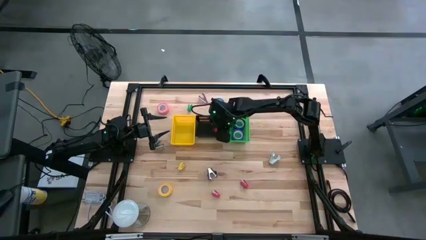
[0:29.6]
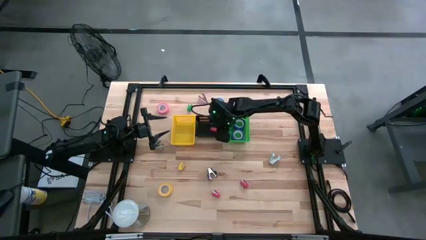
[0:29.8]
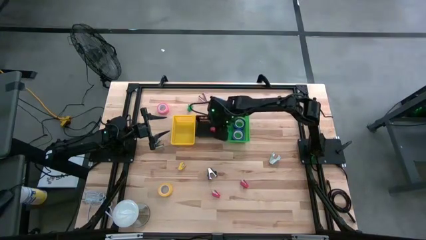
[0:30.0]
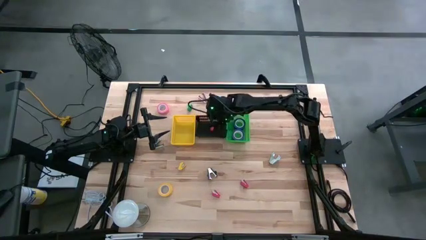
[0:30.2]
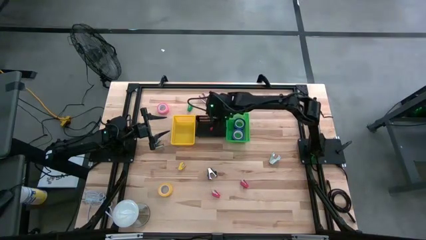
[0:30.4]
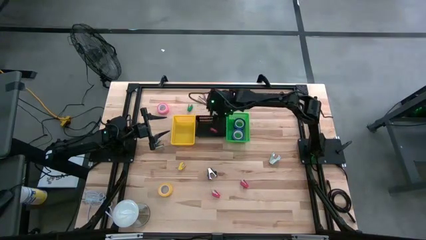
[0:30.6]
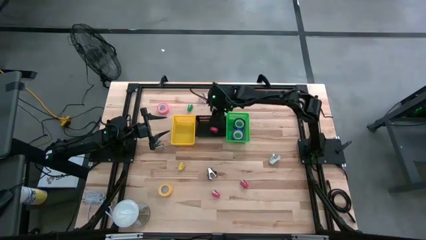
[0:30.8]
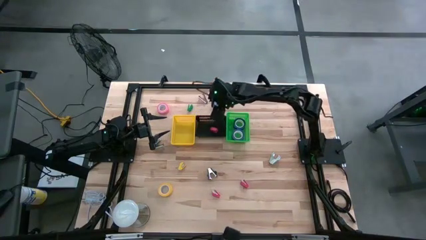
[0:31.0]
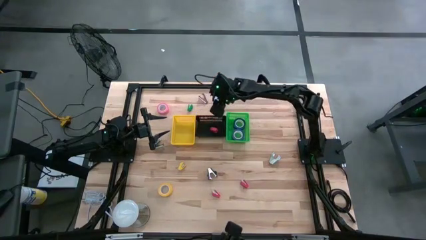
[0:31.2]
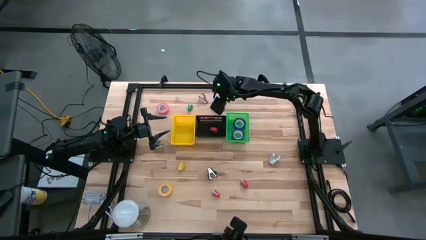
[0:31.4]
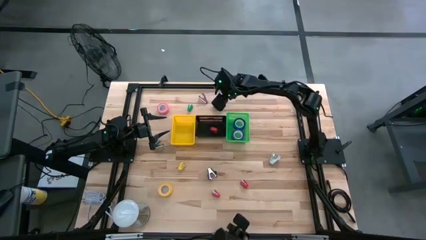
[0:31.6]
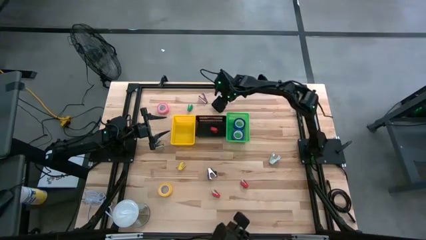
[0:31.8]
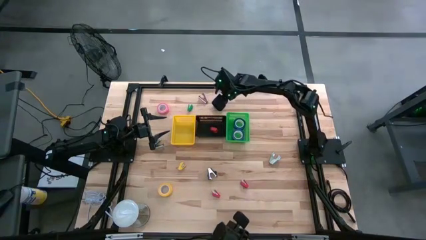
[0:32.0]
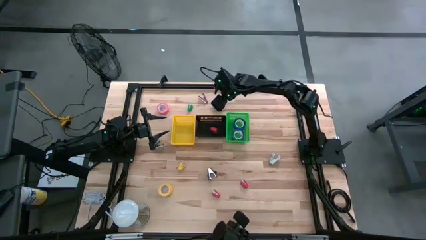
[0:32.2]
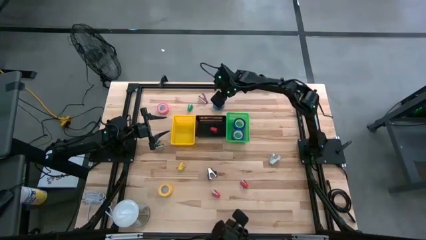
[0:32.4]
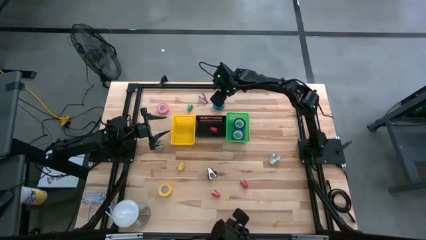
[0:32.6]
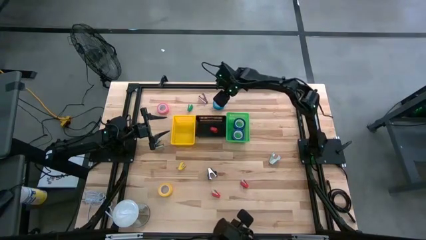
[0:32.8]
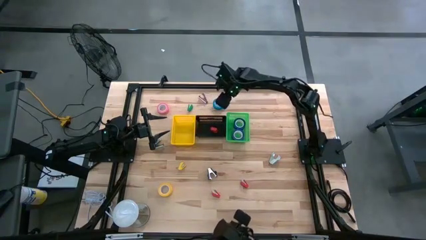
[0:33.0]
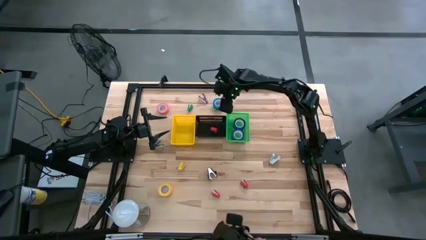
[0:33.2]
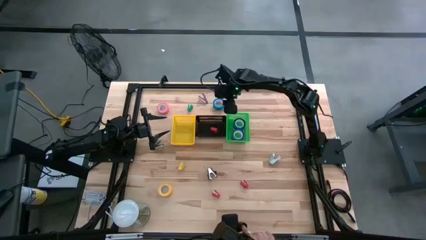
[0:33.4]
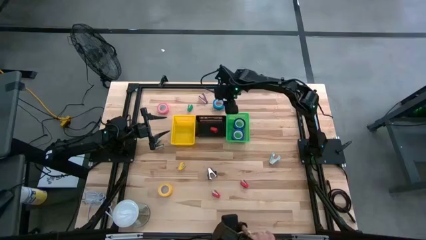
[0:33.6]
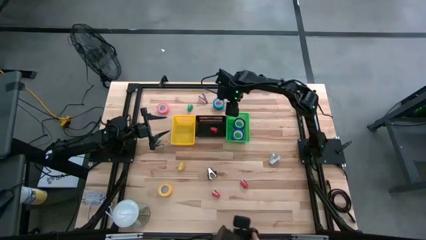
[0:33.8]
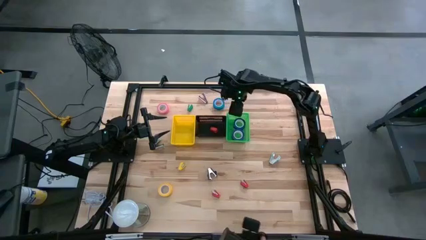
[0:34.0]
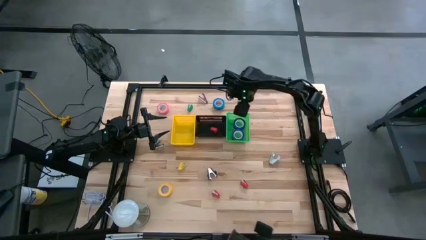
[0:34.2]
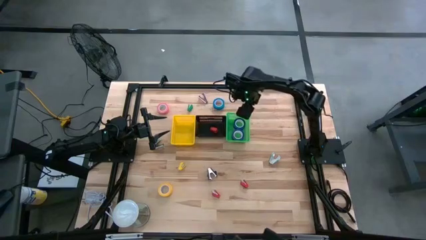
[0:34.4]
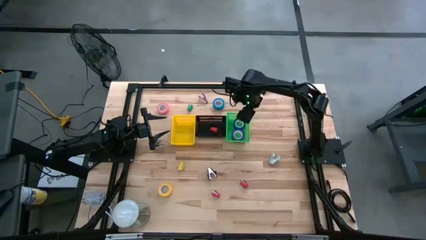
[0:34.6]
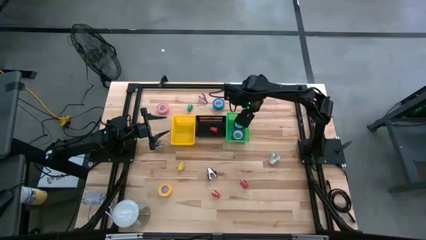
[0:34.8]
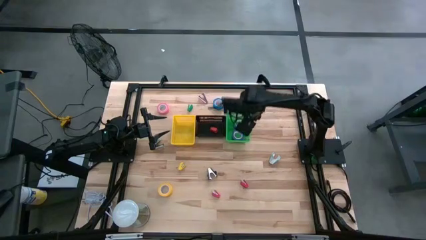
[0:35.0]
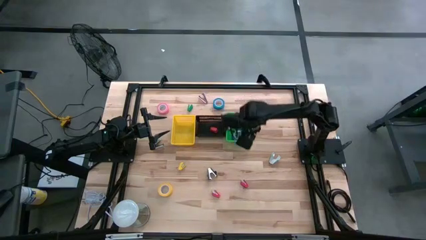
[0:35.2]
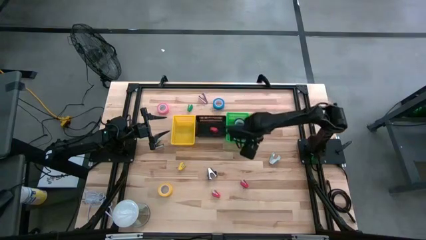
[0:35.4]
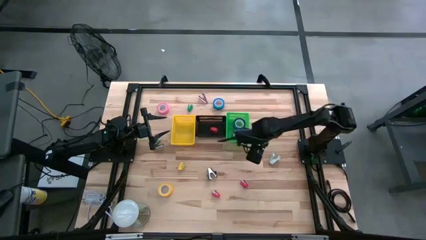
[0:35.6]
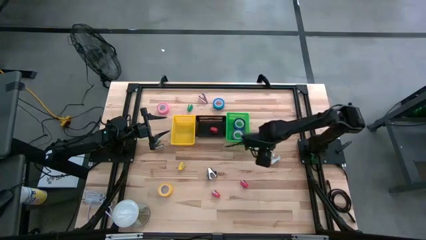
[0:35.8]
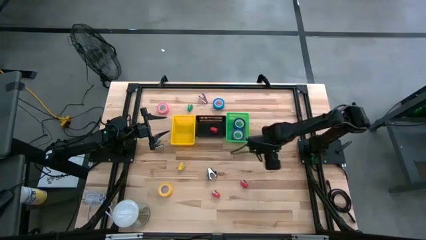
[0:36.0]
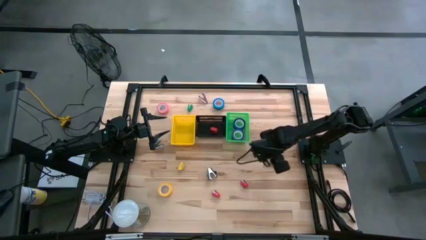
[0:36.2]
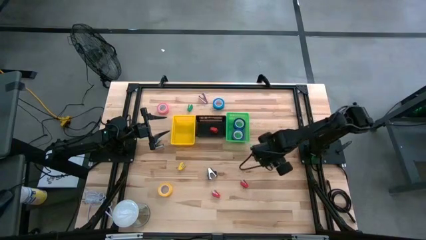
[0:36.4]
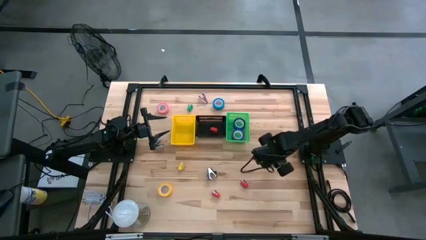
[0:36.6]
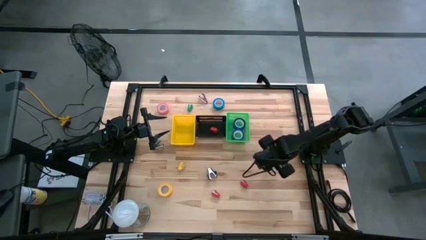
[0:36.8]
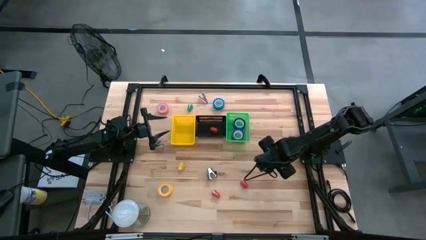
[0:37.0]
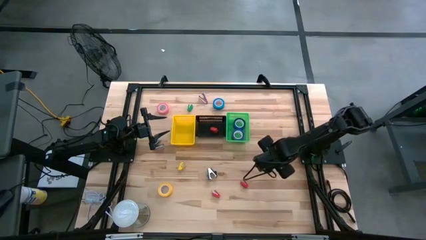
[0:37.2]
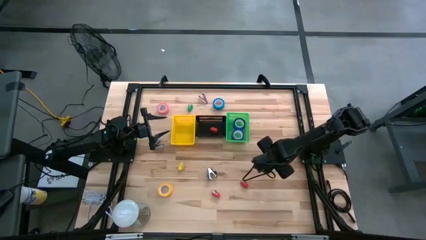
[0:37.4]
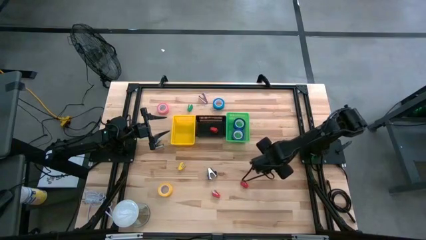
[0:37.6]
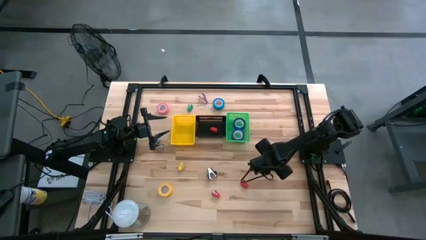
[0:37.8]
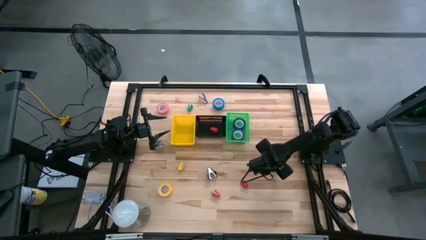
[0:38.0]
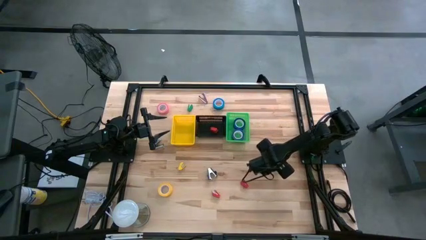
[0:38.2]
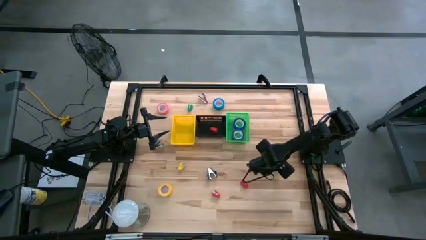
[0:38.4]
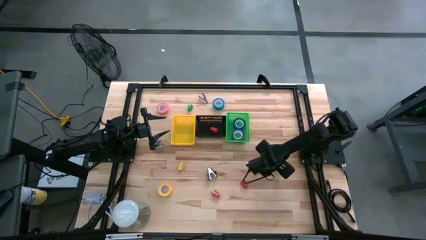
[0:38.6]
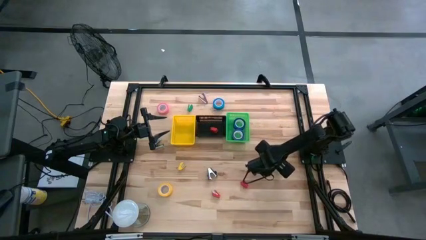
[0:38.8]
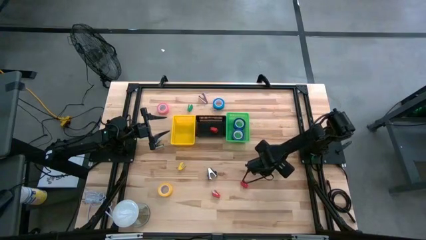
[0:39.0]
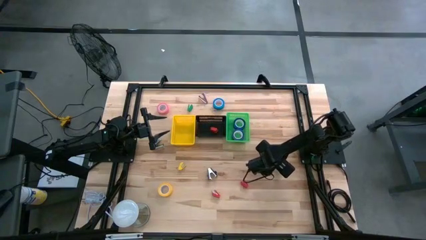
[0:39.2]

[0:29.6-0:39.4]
Task: Pick and place Stapler, Stapler remover, tape
Put the blue staple remover into the yellow bin

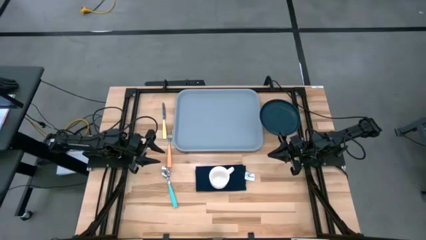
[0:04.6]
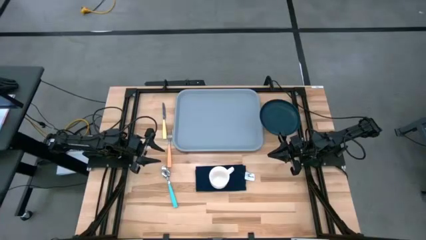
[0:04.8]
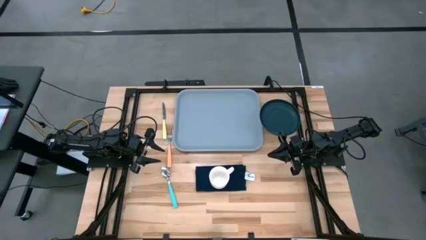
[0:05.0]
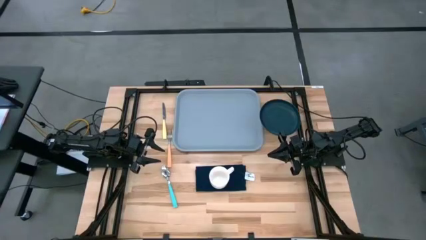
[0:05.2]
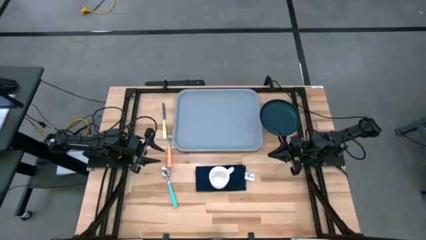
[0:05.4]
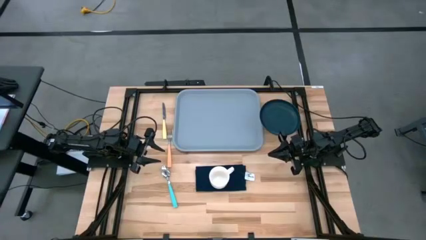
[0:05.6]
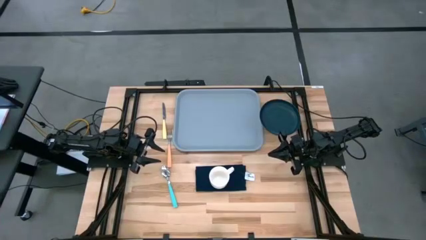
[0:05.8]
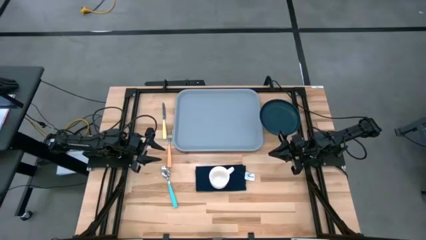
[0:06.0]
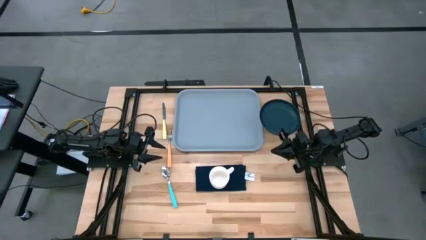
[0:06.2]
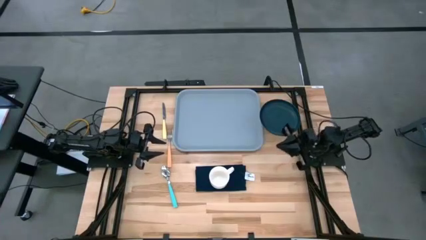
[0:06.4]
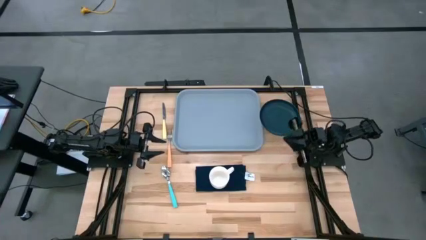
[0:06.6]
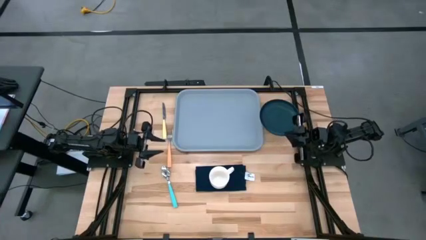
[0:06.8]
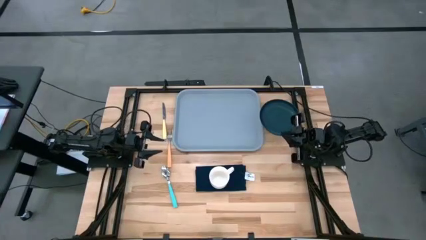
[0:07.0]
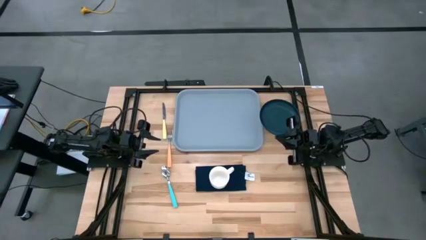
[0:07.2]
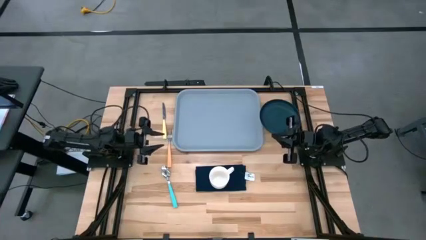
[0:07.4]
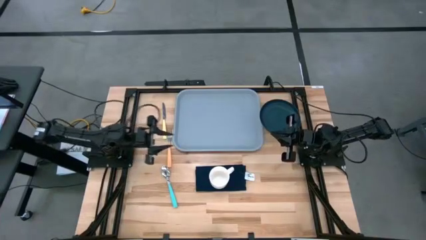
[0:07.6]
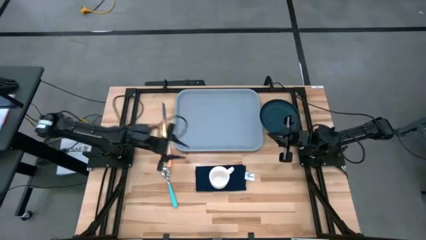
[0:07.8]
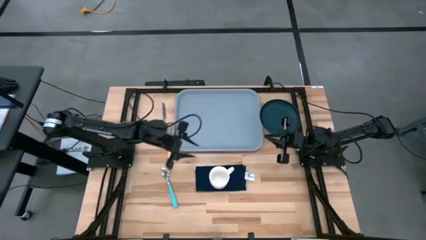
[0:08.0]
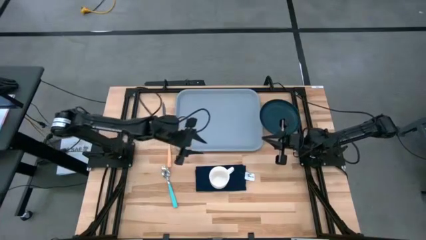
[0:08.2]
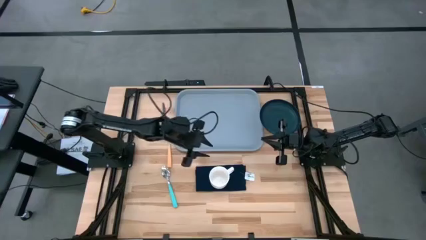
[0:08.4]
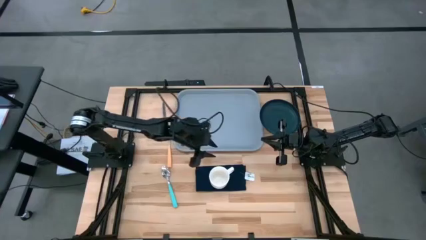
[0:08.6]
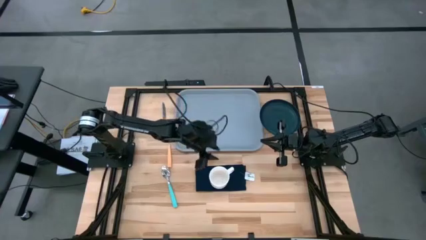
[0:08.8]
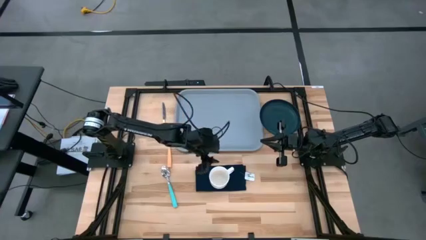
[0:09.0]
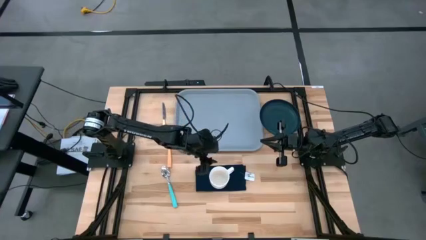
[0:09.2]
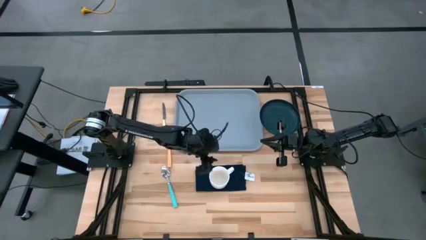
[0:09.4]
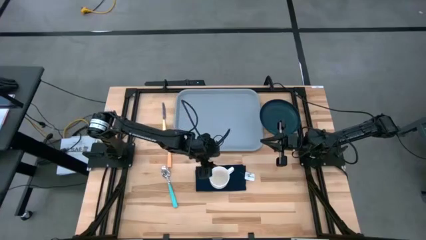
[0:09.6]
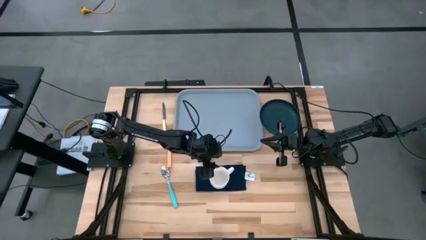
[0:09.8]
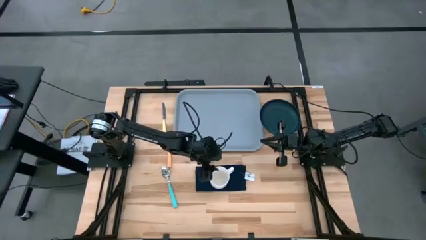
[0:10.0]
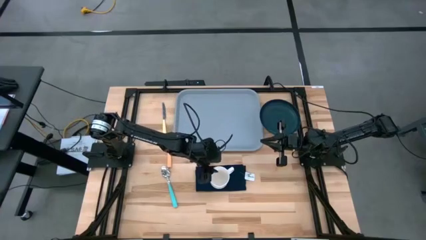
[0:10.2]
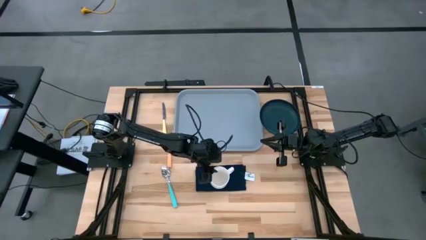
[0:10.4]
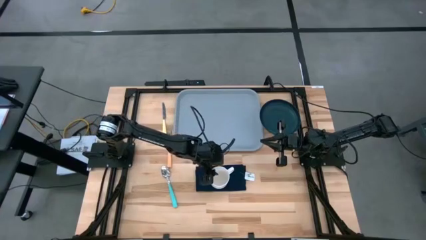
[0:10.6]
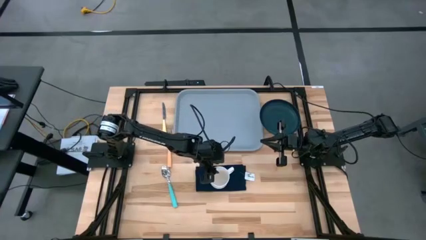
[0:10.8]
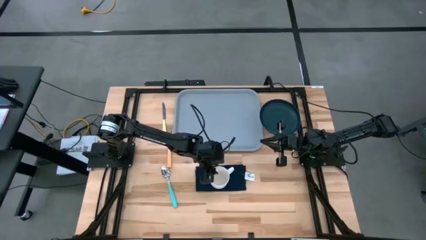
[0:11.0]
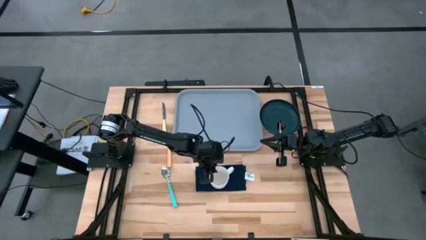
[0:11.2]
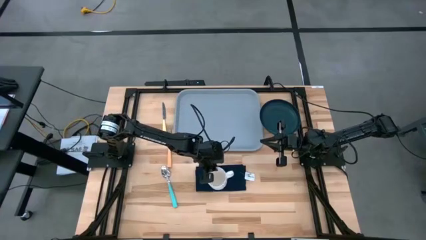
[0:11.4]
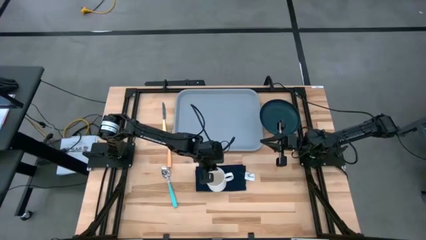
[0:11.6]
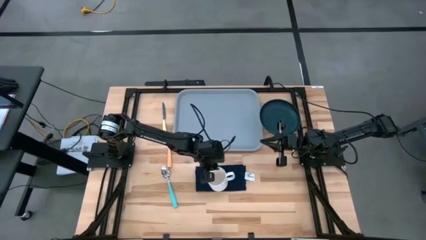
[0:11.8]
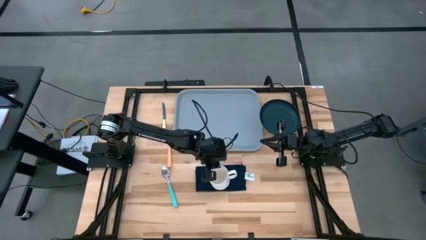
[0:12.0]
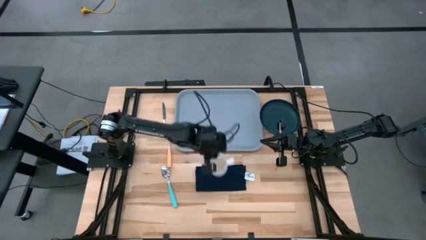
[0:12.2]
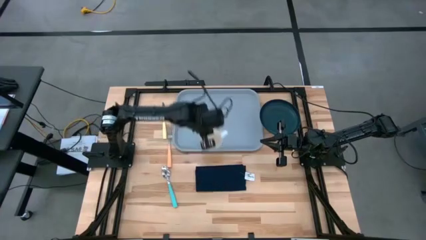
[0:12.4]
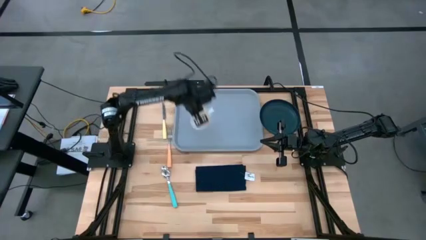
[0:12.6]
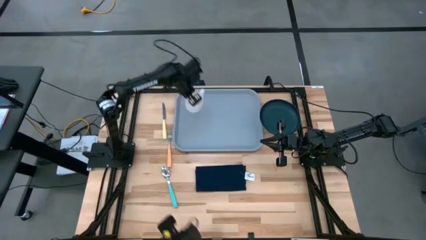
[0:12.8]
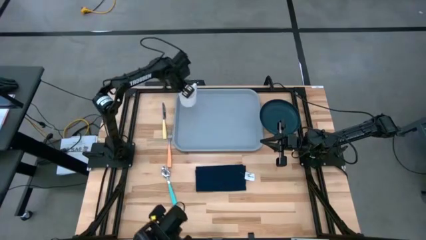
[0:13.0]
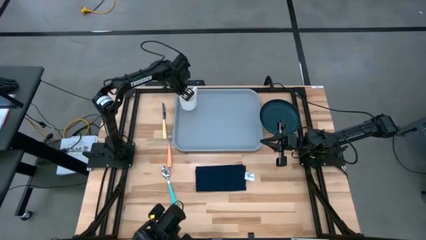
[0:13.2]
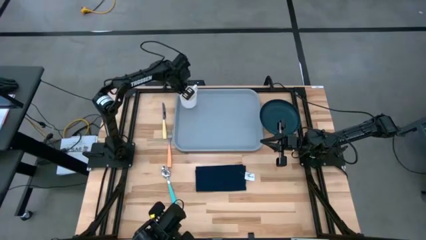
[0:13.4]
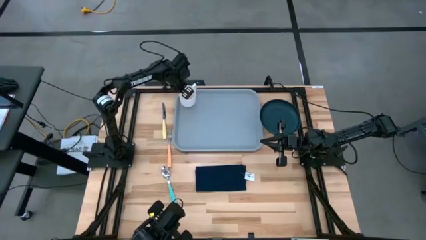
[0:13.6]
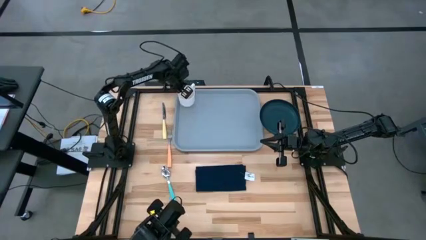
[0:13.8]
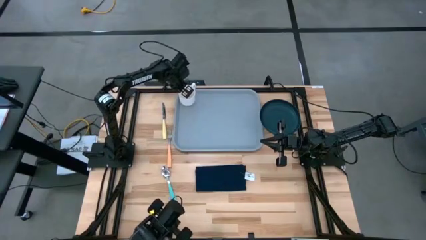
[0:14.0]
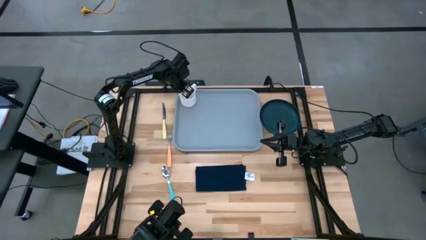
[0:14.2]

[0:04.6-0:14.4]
Task: Set up tray
Put the white mug on the top left of the gray tray
